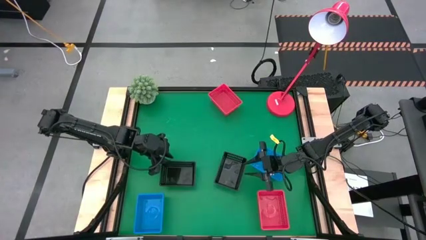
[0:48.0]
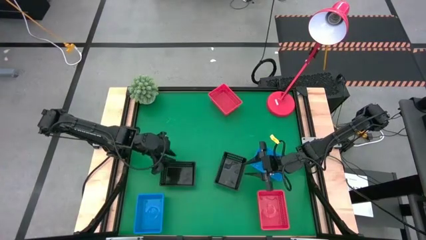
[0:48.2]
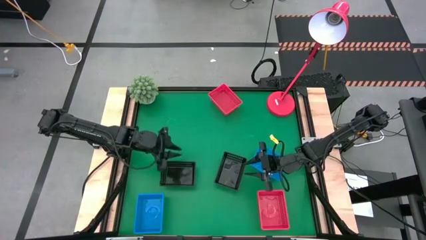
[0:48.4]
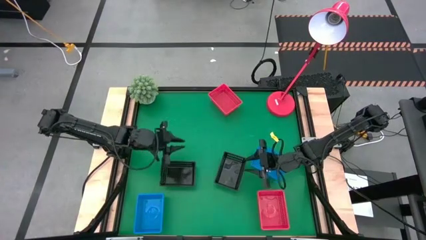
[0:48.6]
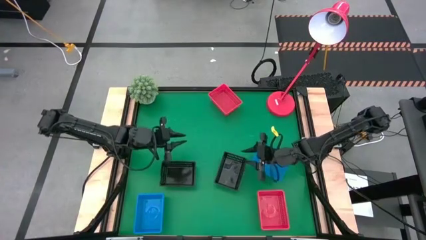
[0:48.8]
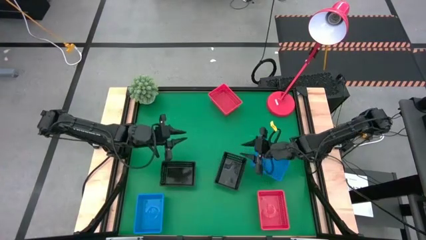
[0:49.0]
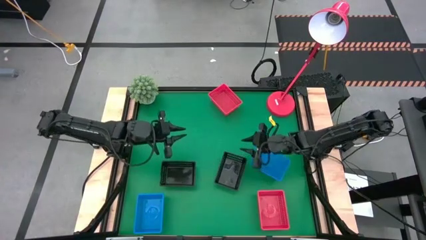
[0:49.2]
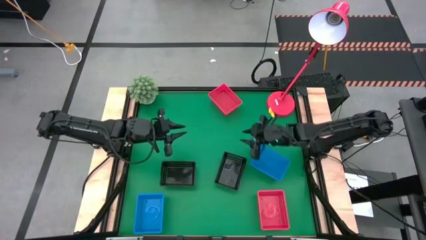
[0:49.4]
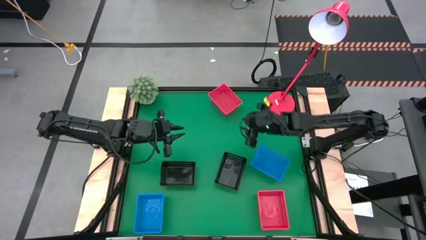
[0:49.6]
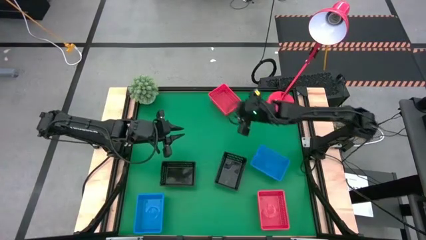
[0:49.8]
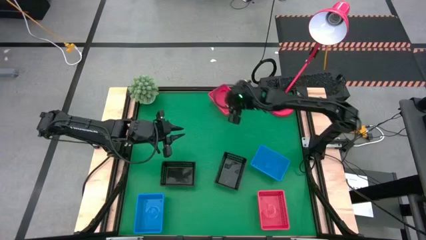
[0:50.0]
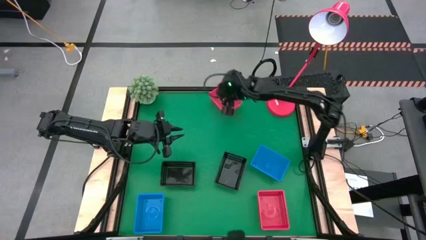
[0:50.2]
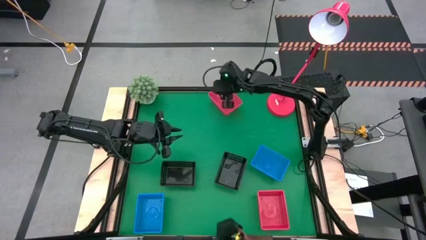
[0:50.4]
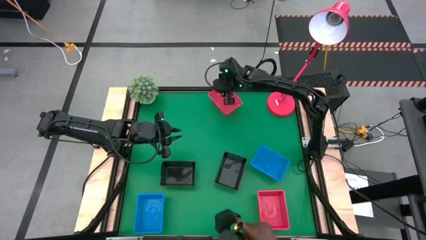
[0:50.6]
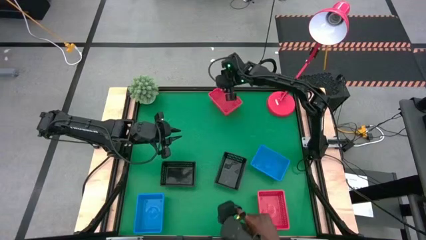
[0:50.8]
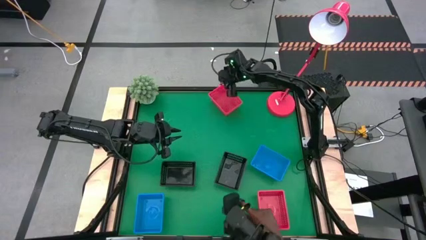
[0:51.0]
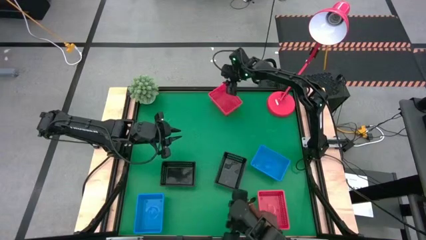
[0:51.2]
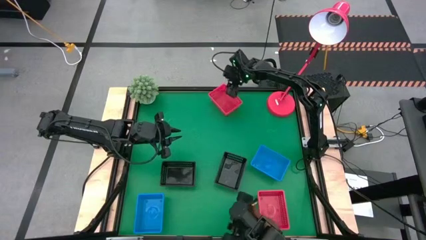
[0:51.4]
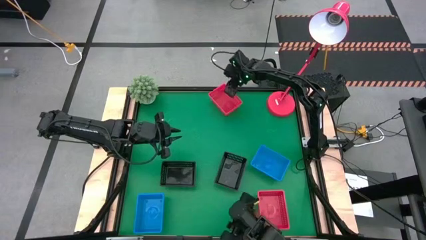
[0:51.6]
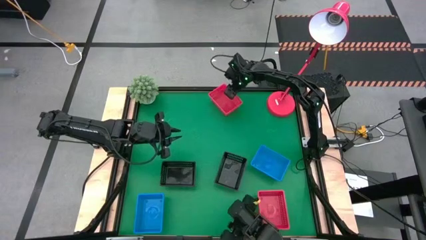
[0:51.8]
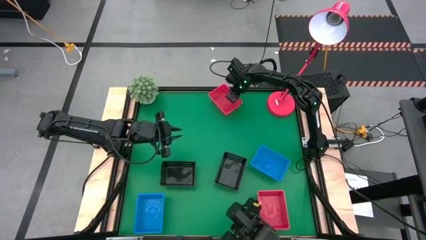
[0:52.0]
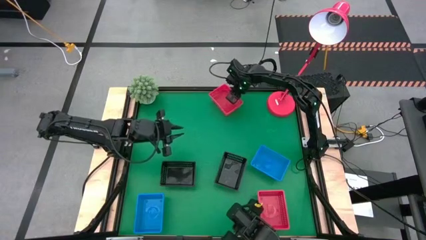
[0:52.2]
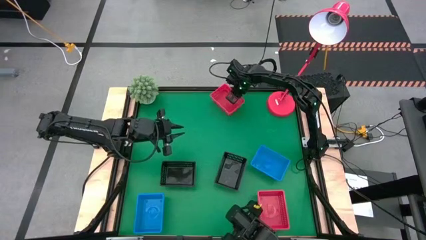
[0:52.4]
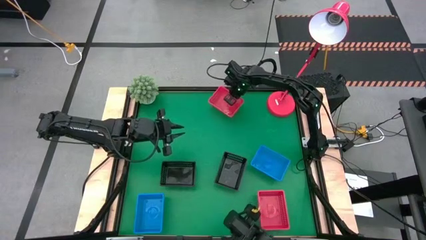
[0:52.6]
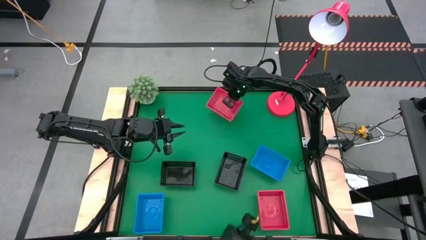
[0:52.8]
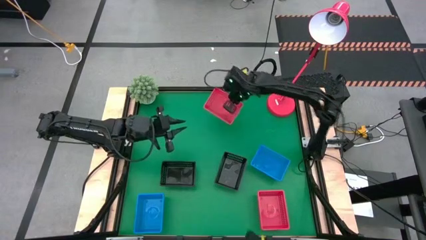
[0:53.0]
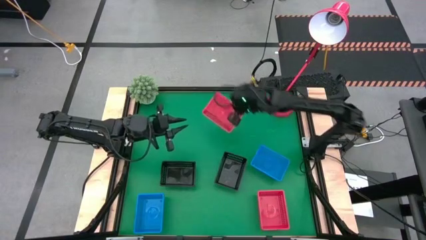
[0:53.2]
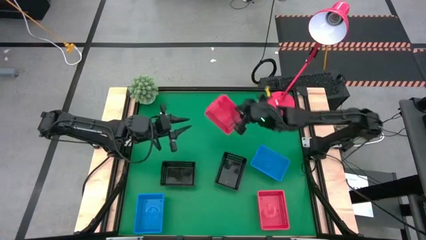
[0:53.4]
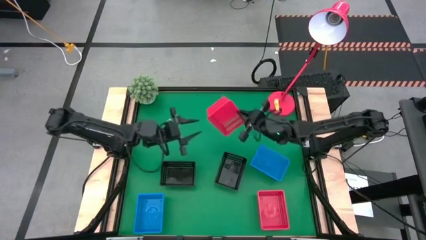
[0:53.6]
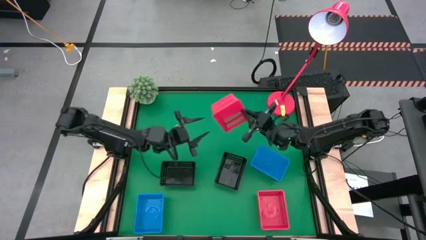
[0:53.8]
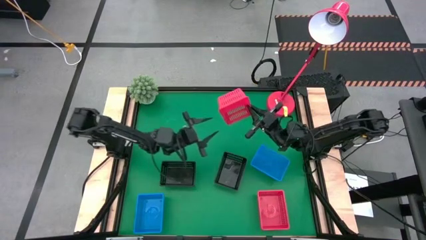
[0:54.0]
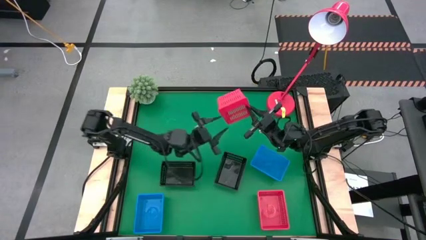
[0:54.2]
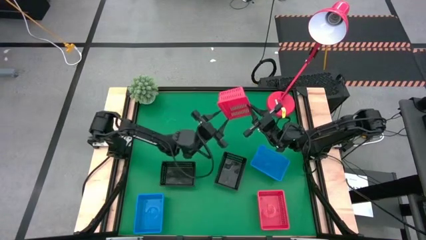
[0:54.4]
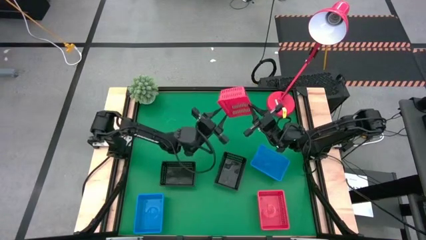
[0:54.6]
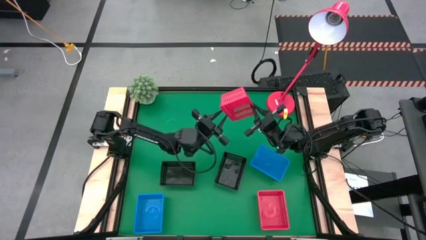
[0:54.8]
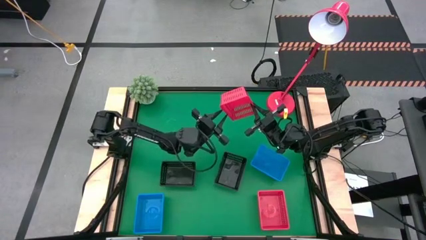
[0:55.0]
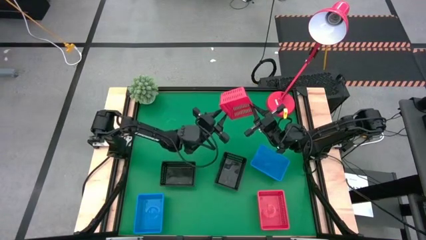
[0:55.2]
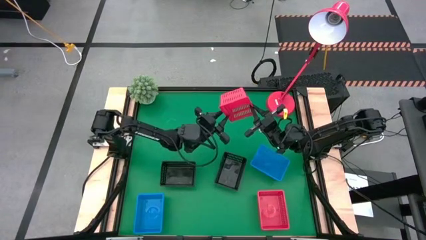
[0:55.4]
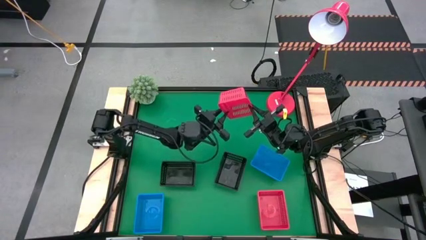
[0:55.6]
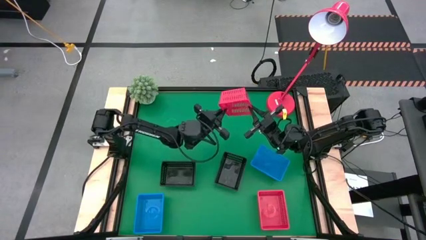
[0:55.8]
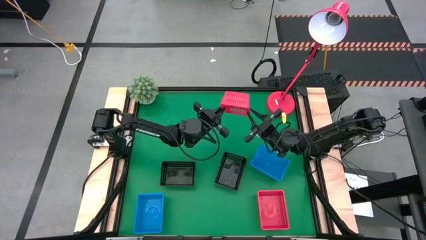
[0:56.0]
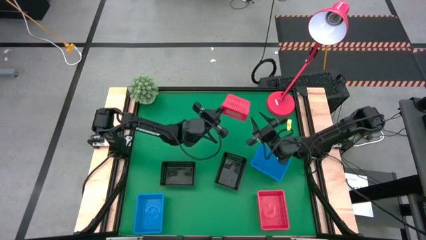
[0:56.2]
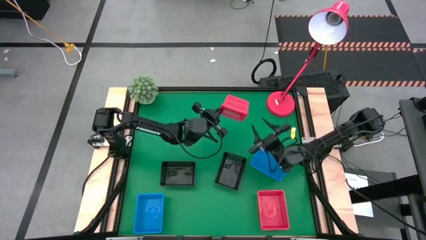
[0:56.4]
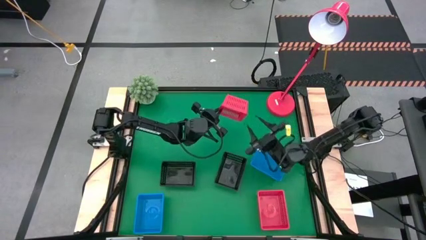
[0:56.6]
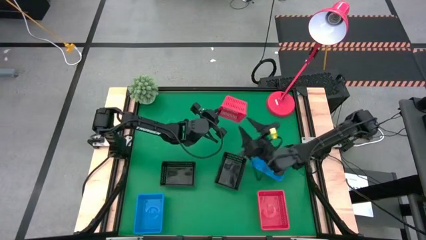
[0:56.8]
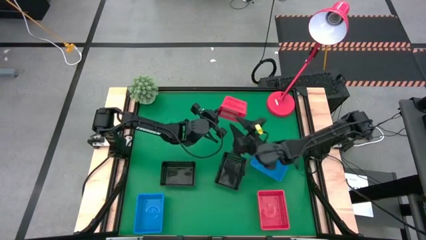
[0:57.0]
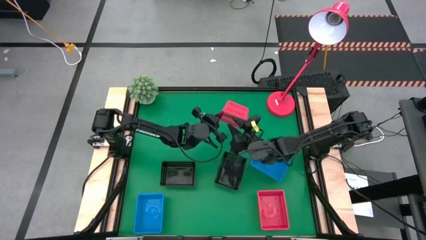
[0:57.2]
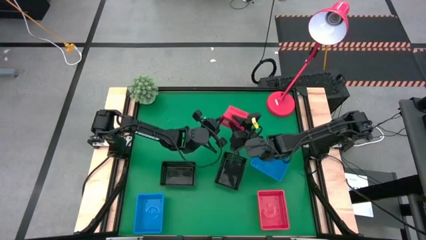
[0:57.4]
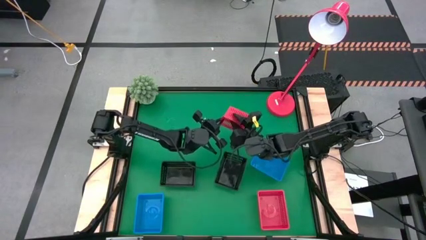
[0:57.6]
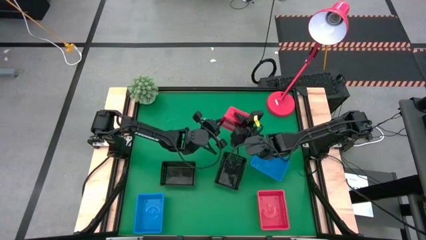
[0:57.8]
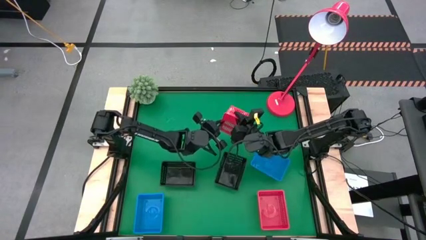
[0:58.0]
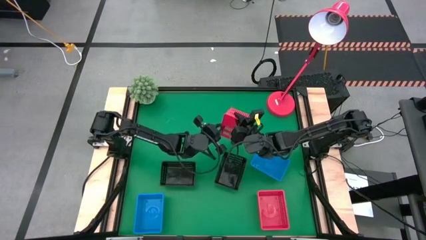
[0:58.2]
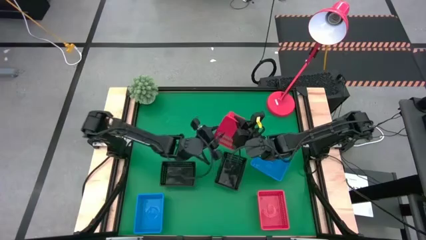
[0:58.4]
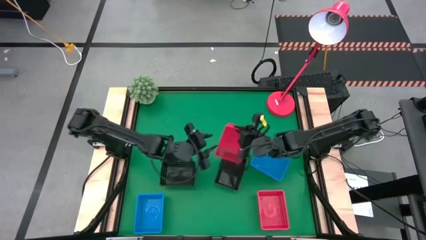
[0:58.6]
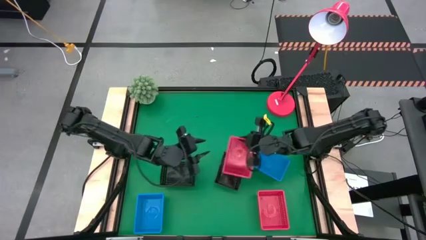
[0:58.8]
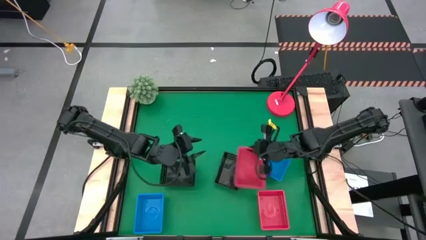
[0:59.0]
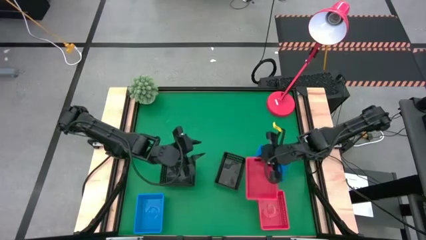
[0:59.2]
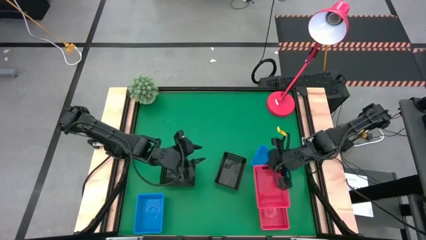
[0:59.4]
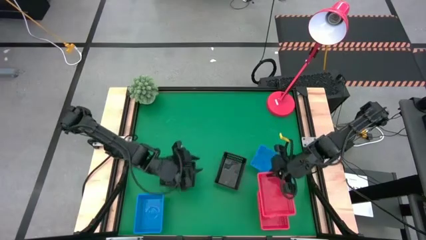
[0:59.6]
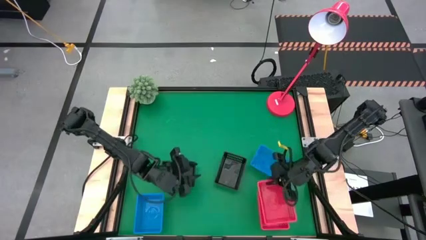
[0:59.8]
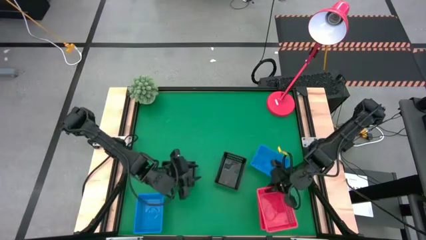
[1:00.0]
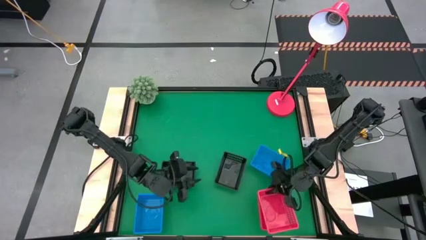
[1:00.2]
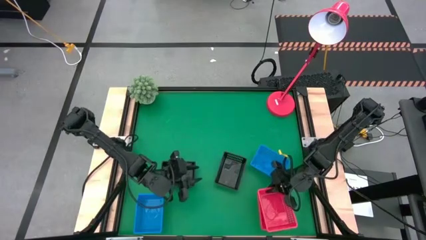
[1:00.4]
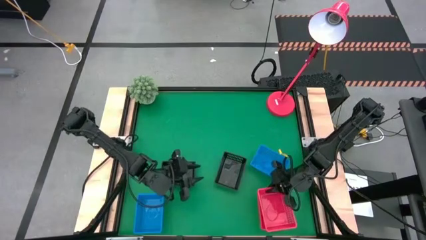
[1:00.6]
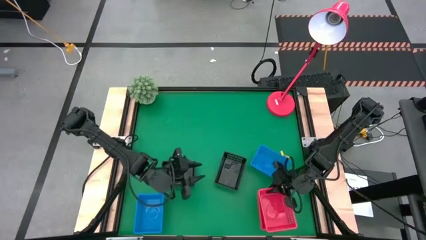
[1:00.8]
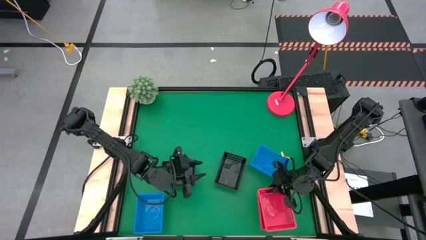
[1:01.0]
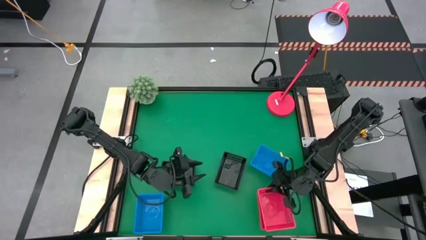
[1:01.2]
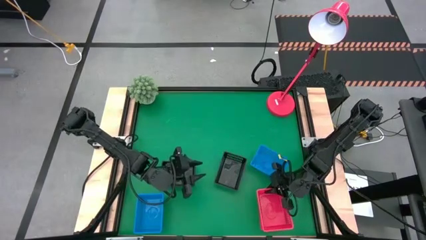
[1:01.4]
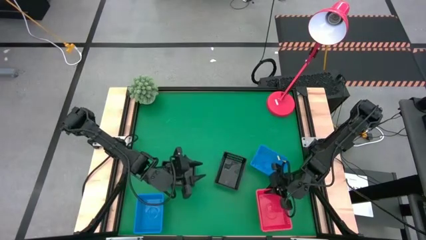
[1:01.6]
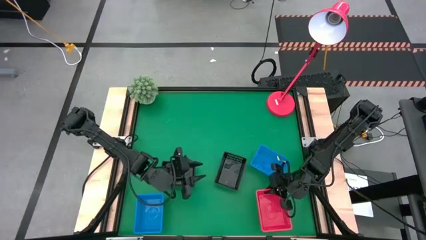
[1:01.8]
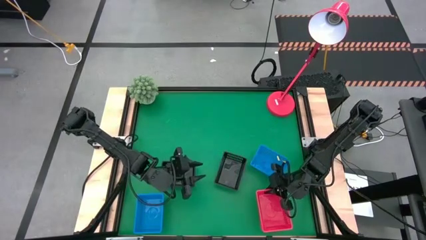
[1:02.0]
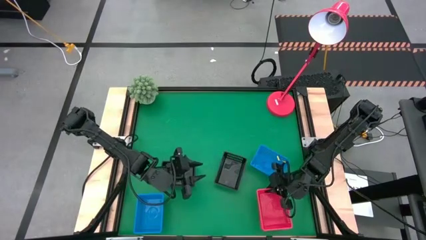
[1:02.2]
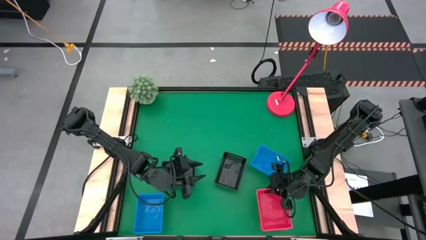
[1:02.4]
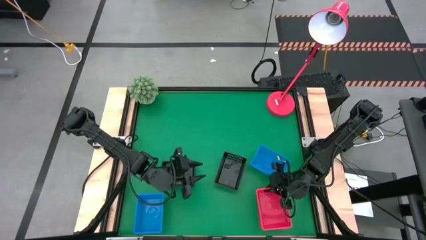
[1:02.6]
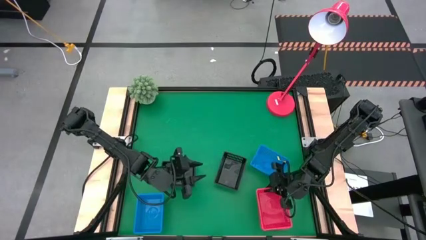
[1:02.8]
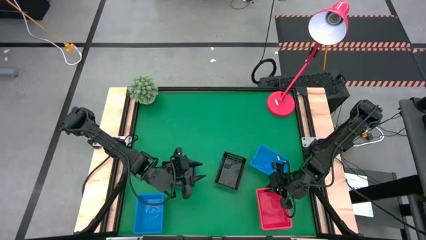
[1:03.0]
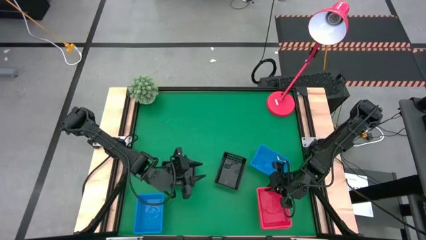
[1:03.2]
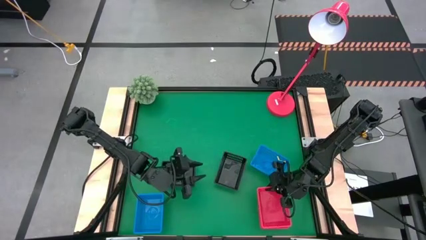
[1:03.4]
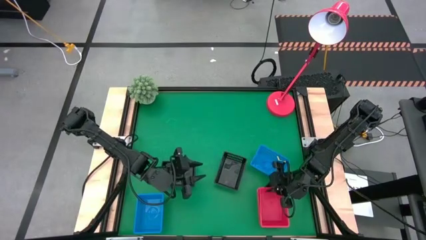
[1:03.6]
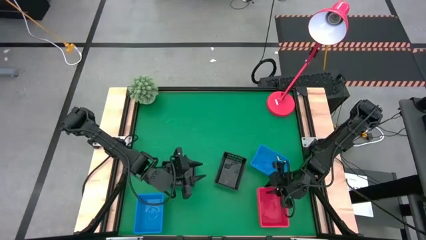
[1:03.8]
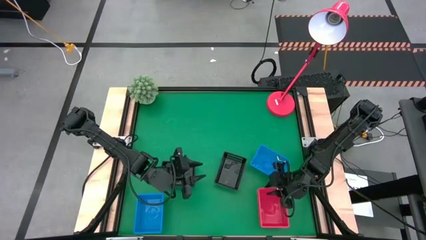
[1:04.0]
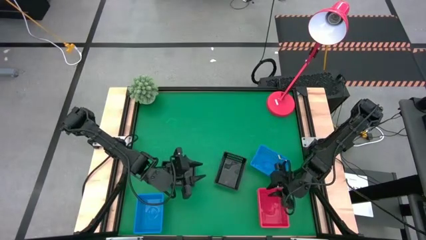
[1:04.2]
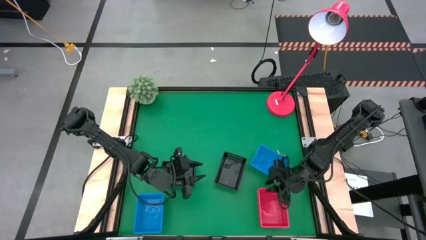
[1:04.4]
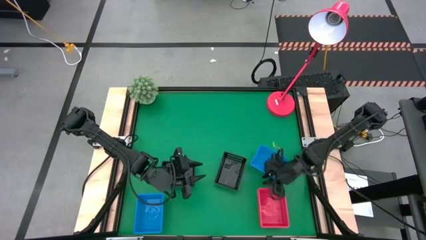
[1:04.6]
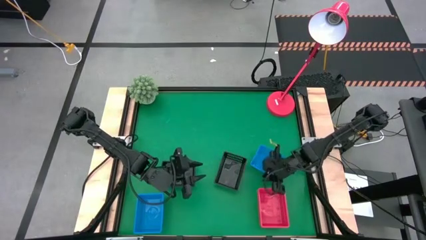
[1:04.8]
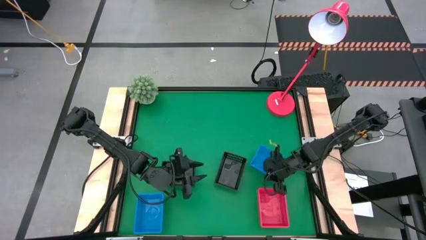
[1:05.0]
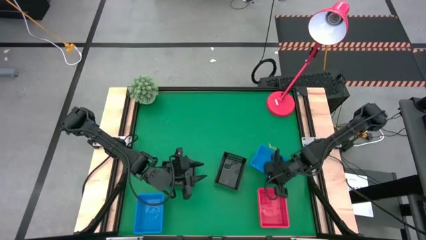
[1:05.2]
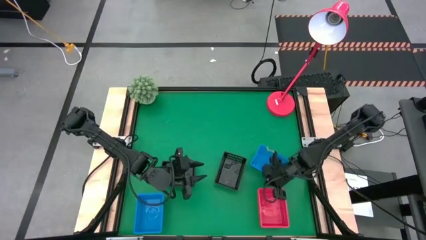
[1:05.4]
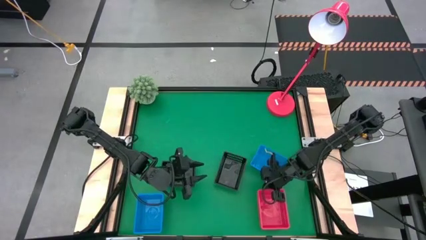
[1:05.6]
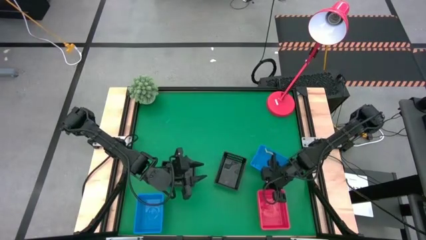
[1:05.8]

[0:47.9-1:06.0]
Stack the top red bin on the bottom stacked red bins
